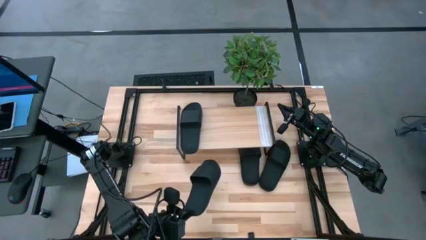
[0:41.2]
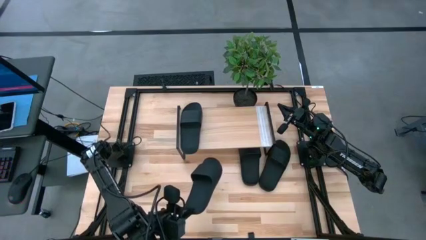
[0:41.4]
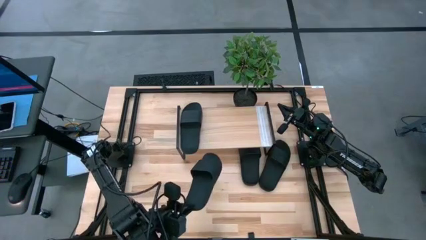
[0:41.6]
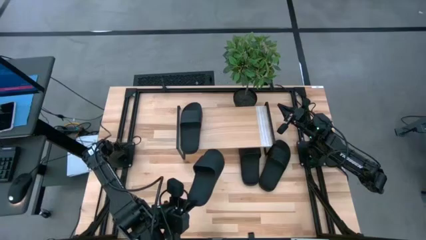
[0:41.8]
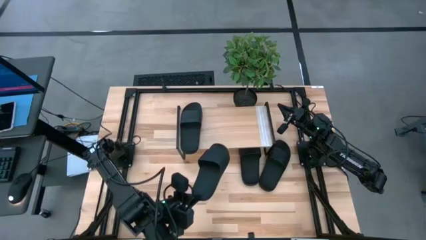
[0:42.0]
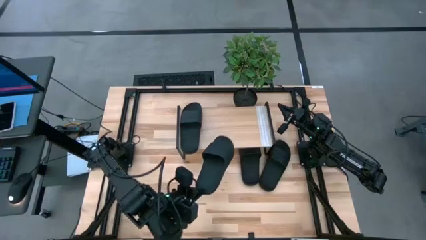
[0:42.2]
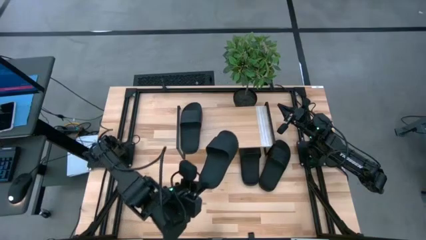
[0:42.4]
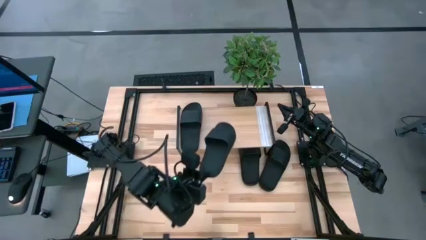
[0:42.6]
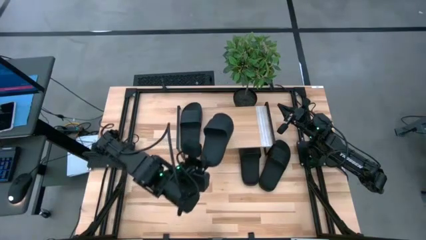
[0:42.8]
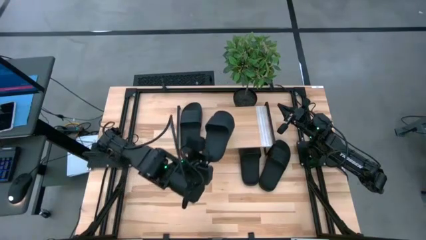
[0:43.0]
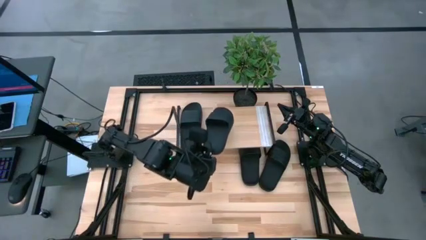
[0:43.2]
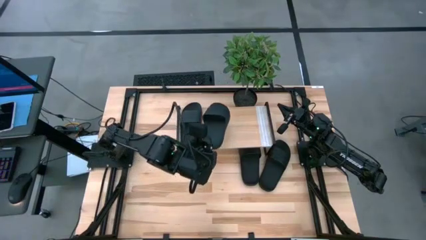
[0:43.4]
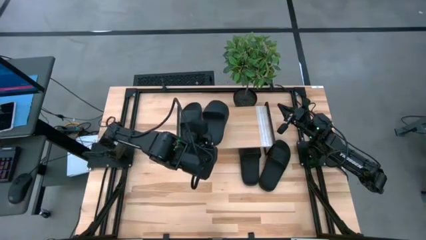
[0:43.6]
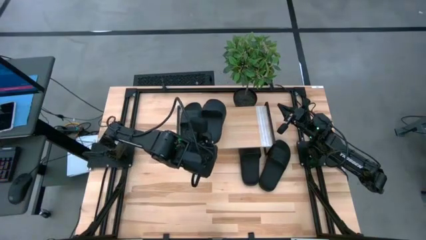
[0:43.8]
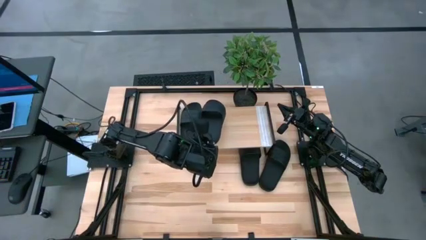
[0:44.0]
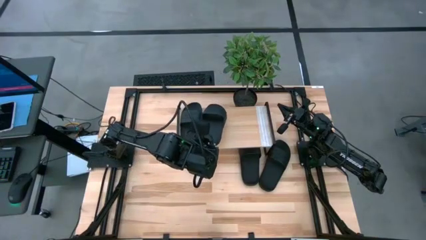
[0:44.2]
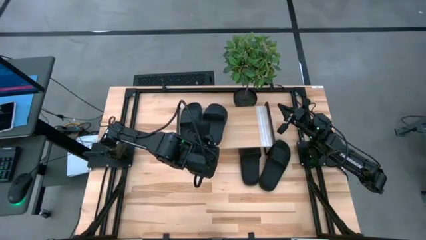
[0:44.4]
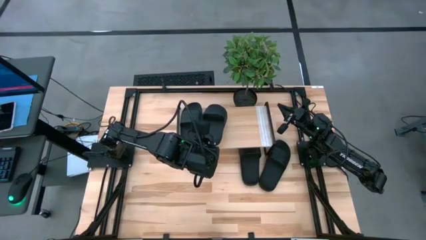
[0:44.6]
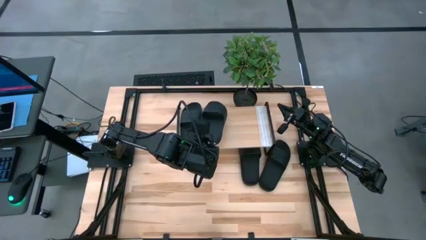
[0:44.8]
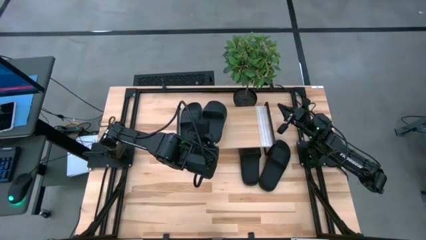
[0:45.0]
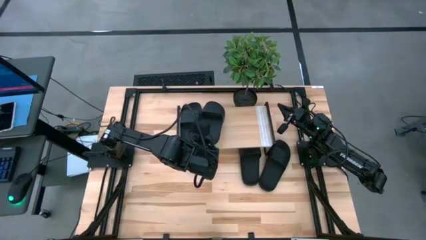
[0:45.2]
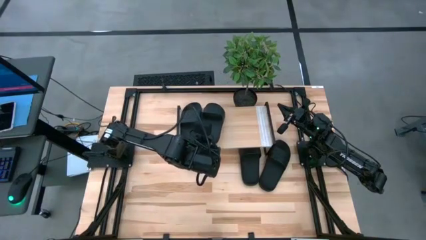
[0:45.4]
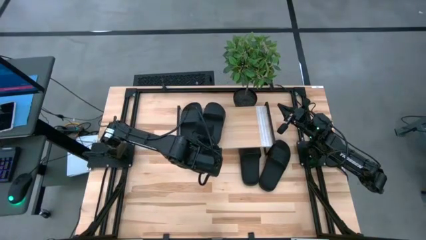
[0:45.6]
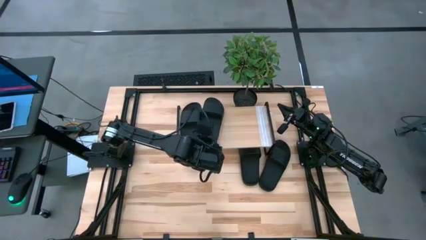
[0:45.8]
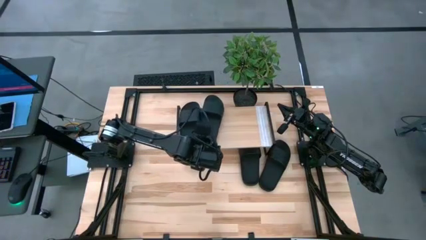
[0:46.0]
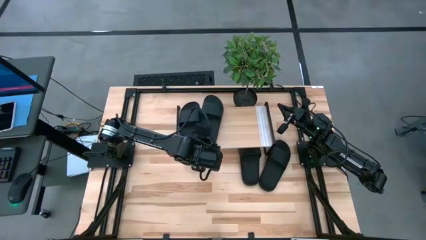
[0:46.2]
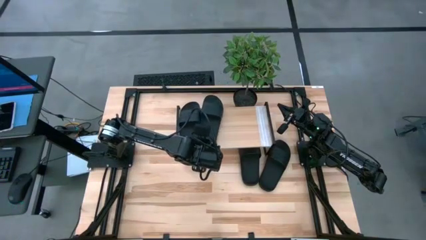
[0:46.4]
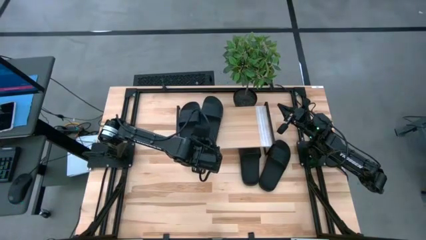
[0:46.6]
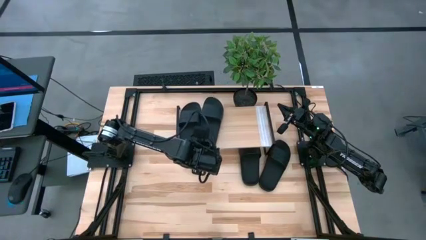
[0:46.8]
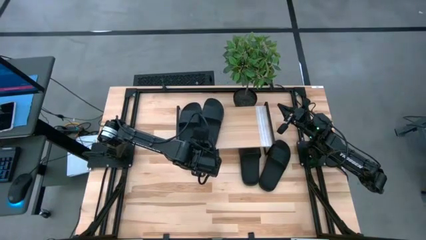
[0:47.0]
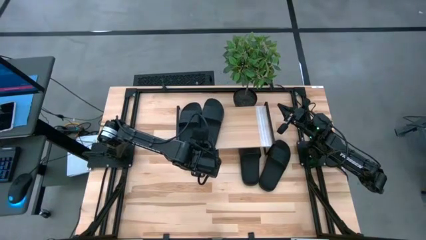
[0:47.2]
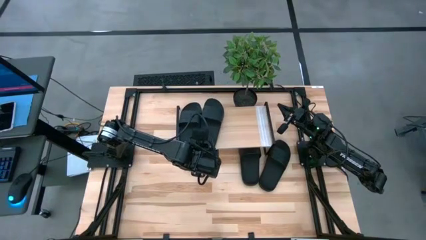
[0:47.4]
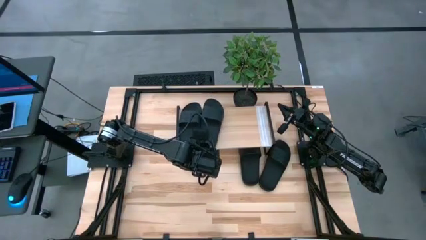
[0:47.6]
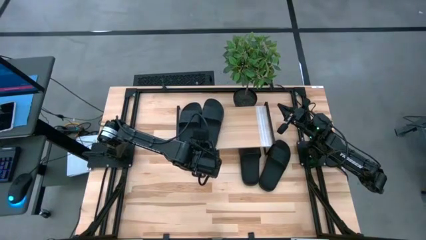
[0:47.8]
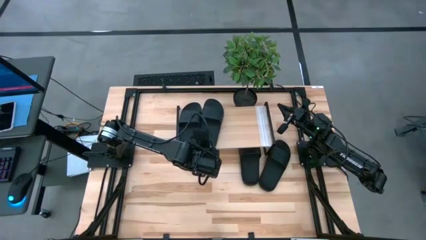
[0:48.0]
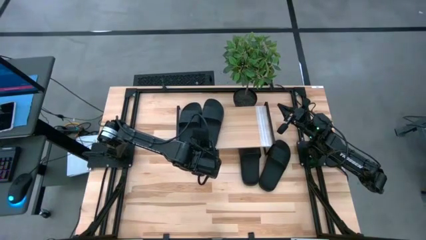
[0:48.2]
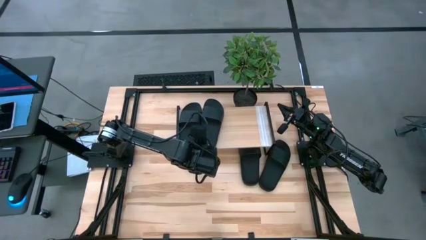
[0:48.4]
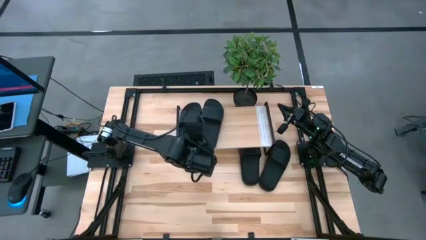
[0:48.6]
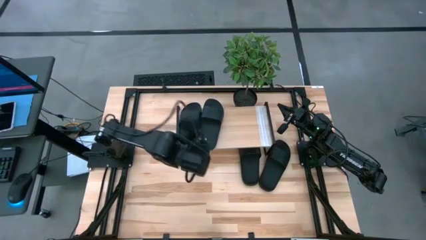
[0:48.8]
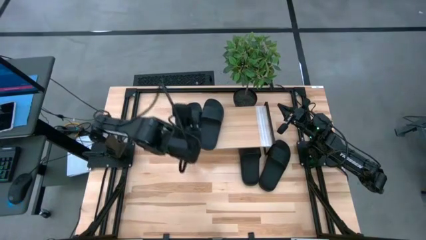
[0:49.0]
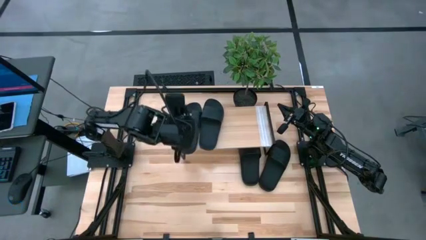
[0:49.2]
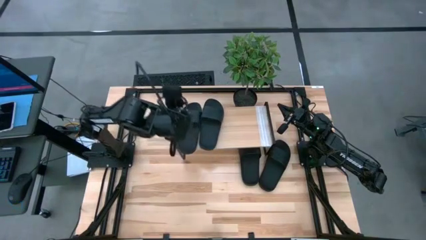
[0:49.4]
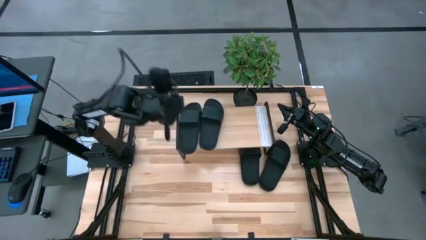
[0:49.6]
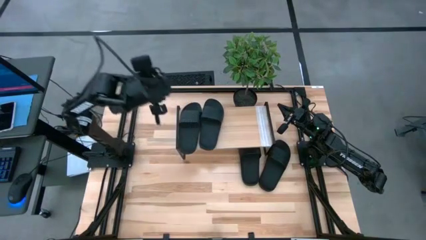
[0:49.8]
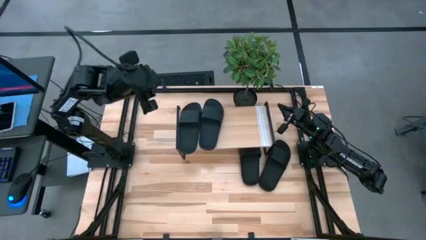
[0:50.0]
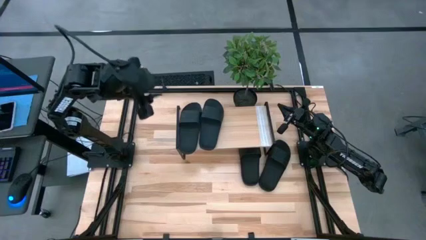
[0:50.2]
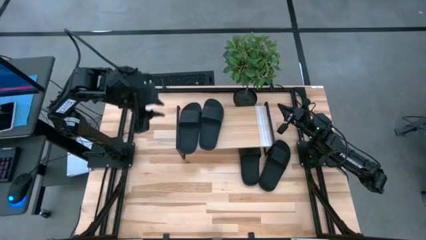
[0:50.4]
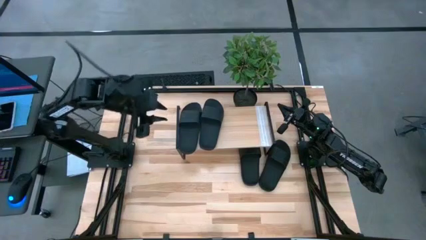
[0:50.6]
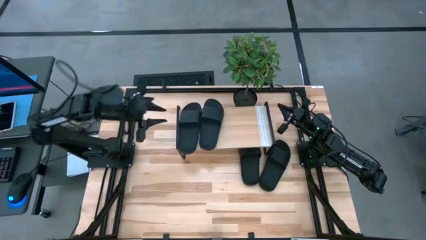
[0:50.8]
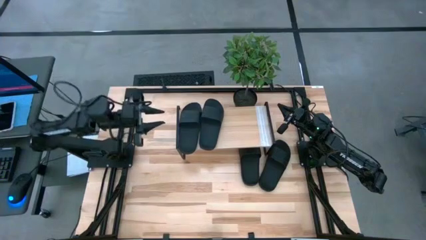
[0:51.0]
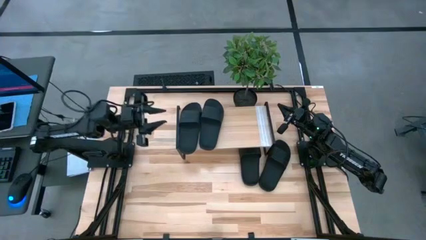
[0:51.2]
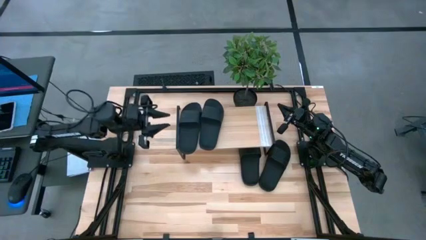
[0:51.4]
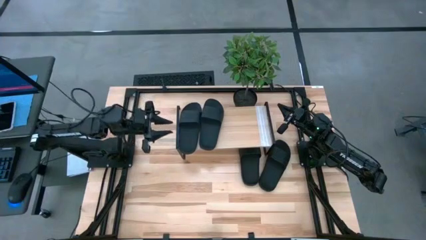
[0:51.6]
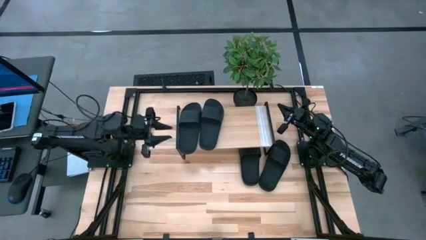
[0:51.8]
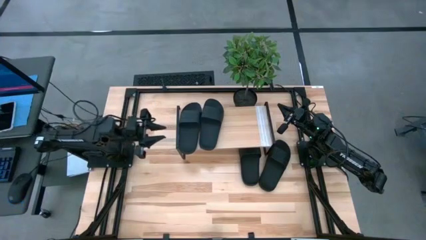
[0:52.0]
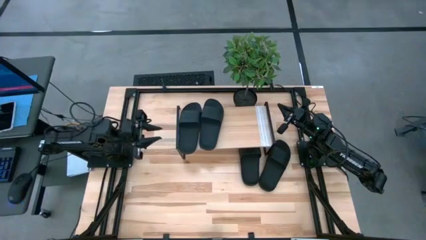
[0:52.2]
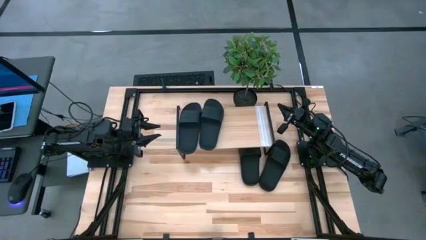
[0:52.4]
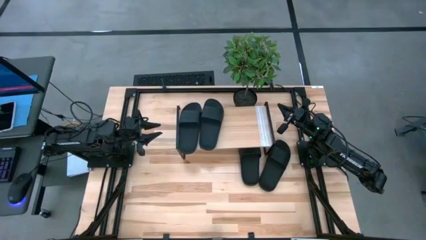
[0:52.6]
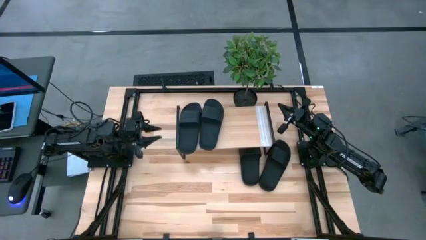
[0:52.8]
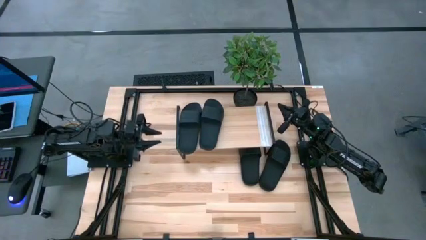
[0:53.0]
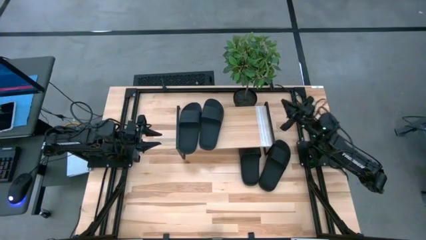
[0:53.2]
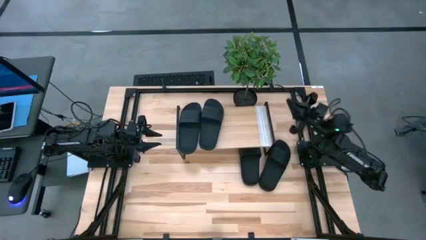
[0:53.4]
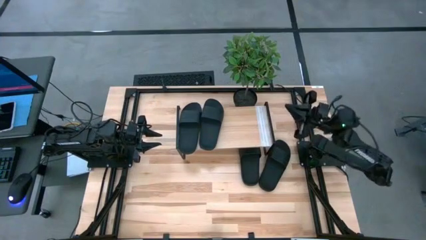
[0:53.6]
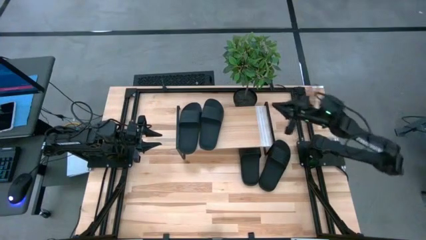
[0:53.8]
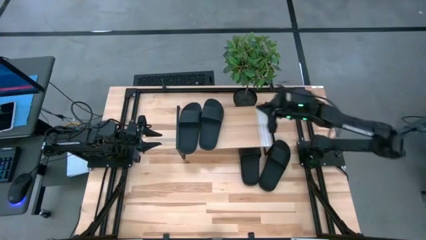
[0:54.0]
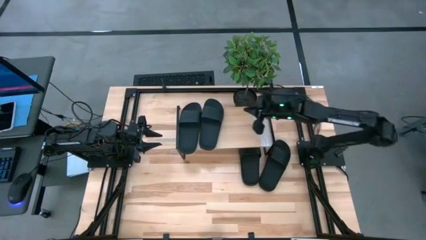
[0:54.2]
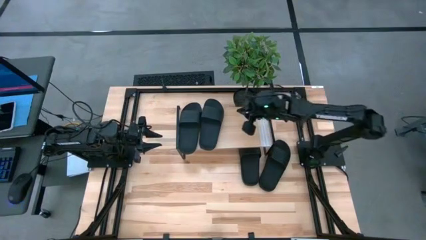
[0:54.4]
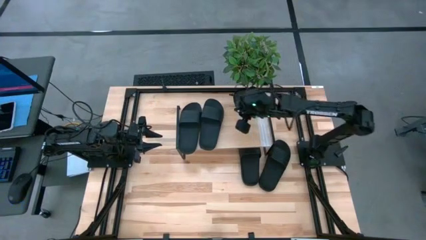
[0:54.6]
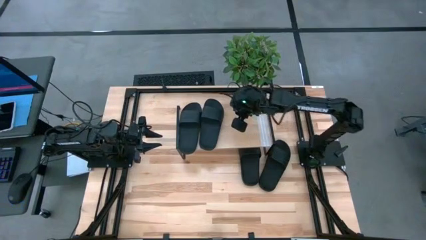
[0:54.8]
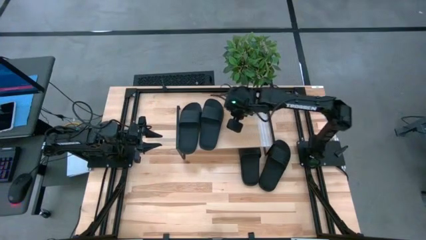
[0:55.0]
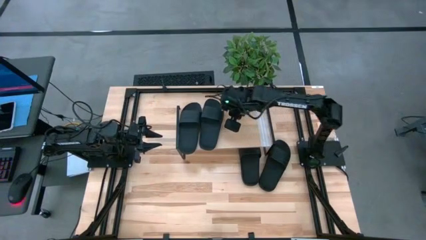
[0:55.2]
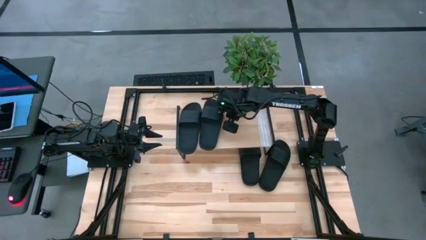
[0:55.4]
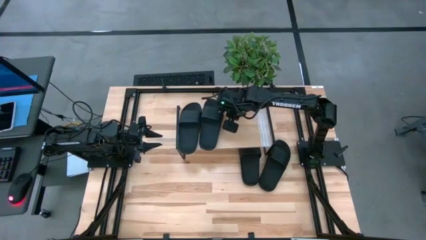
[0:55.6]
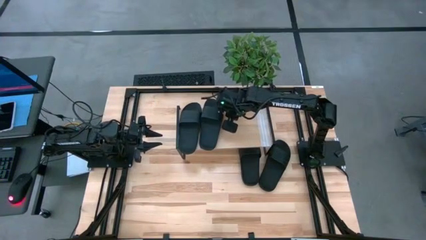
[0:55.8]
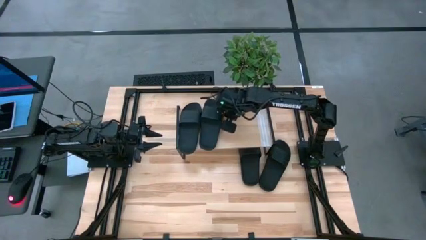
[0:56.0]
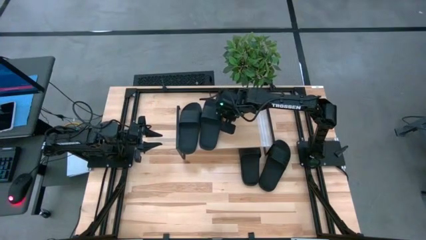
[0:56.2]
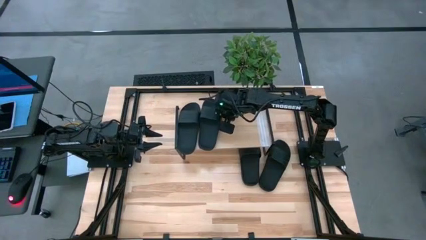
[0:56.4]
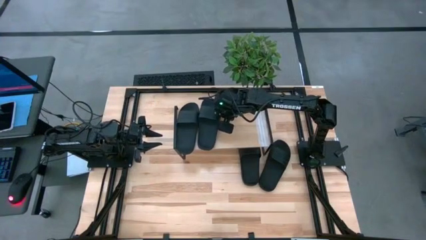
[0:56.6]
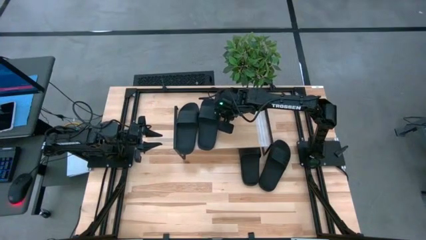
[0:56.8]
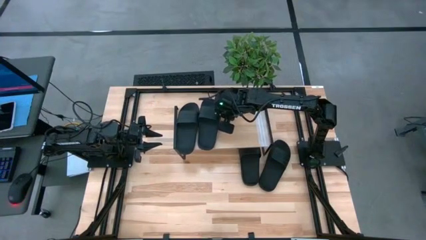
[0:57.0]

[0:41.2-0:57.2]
Task: Pick and place slides into the shelf
Put the black slide on the shelf
